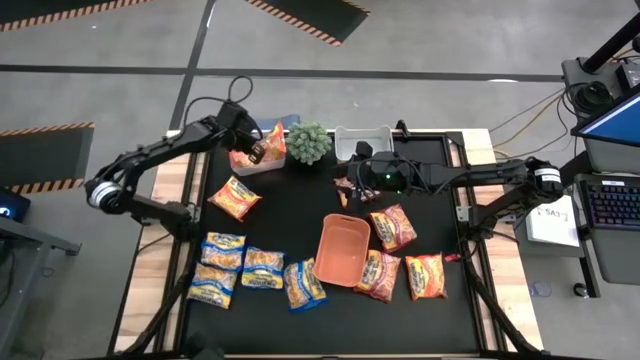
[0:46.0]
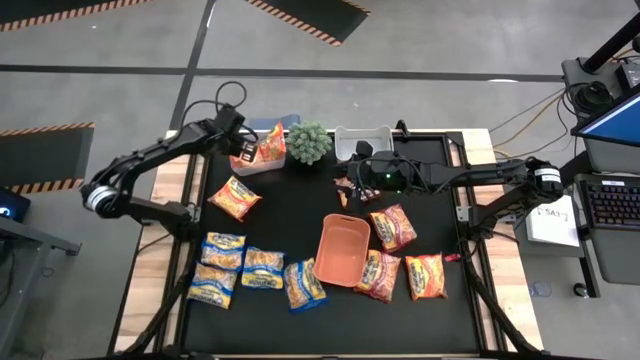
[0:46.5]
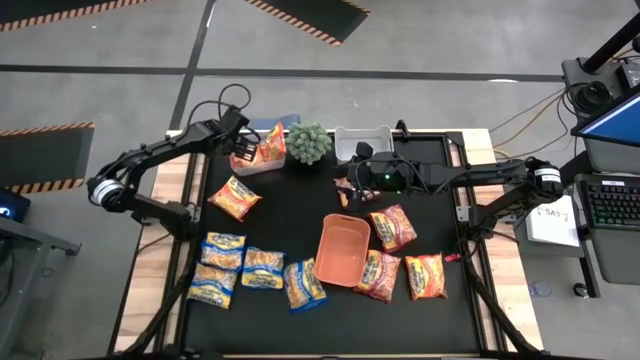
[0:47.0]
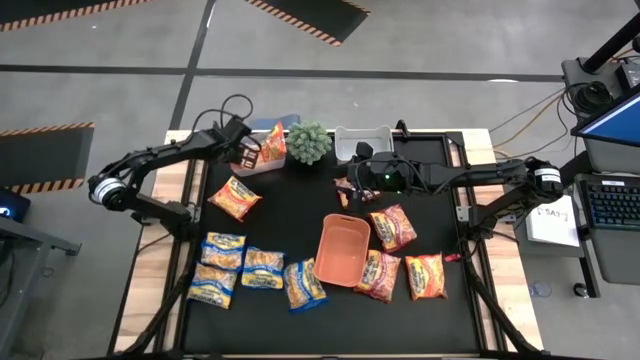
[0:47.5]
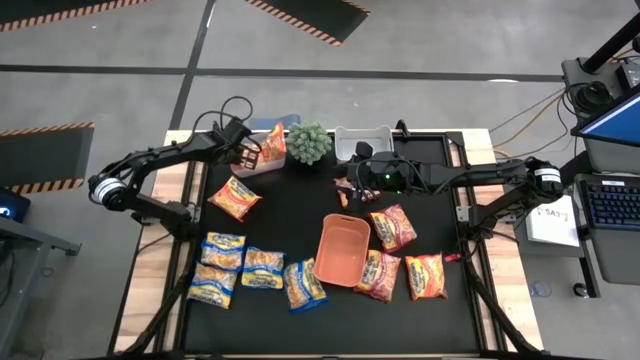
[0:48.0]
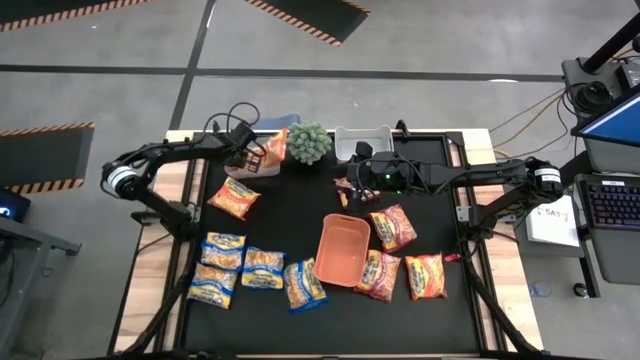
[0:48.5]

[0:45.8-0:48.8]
Task: Sort Maruchan noodles
Adjust the orange noodle pack in the transparent bin

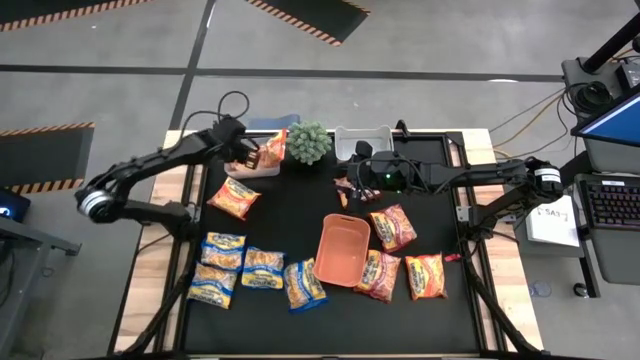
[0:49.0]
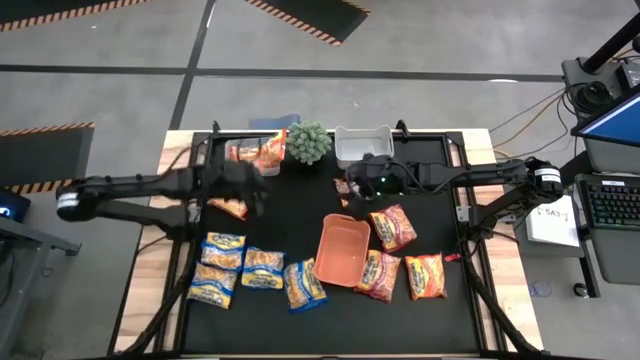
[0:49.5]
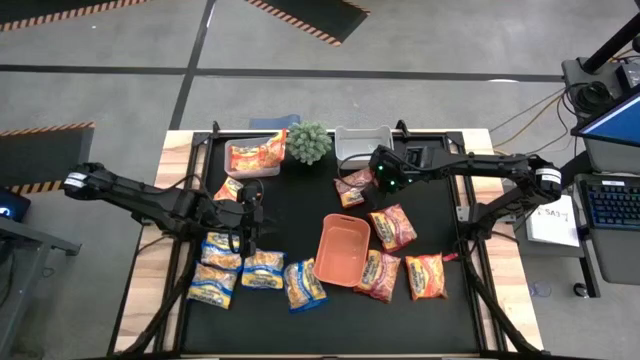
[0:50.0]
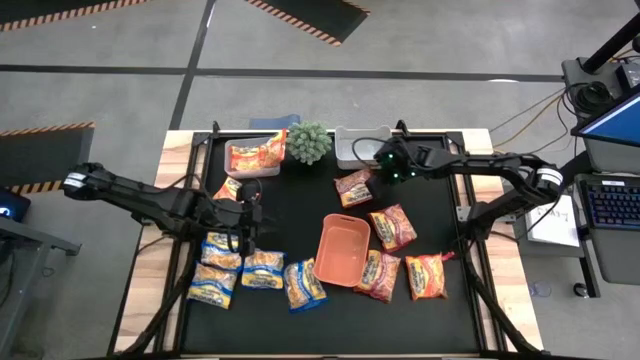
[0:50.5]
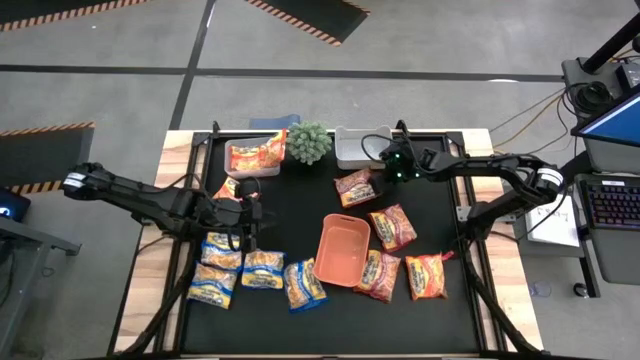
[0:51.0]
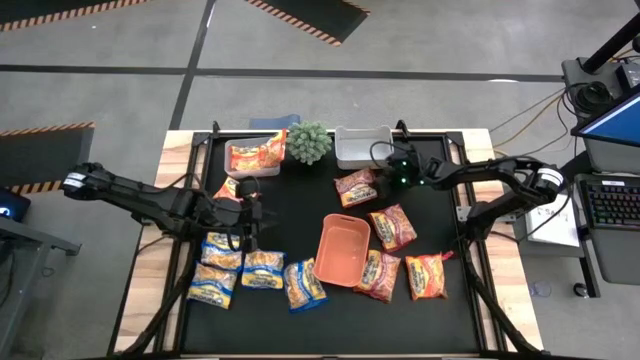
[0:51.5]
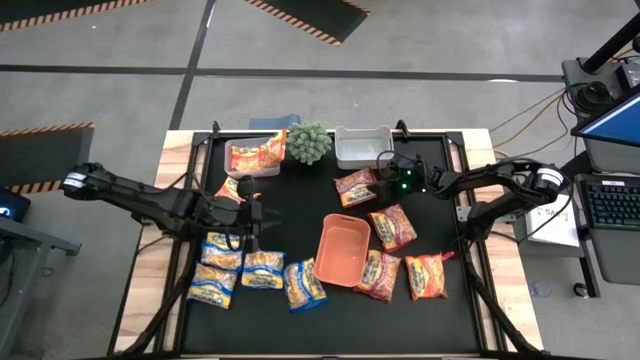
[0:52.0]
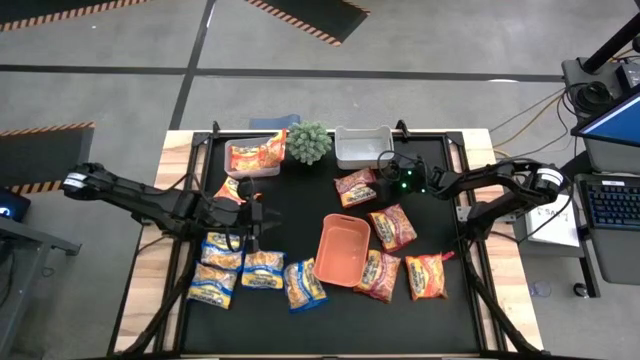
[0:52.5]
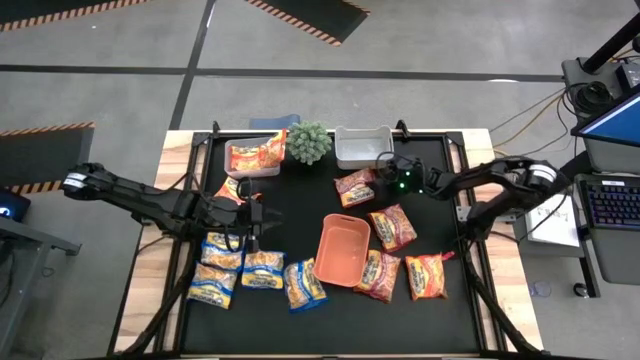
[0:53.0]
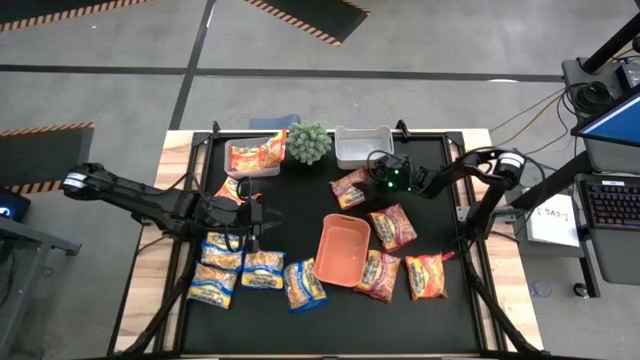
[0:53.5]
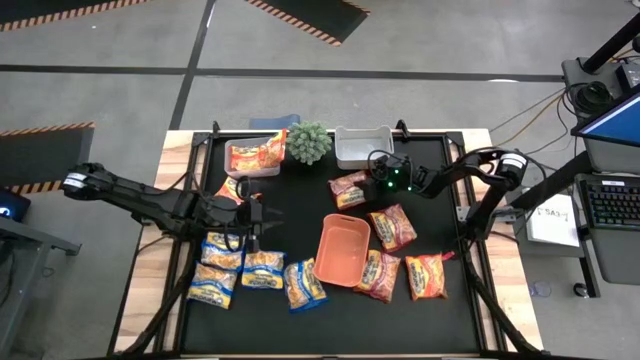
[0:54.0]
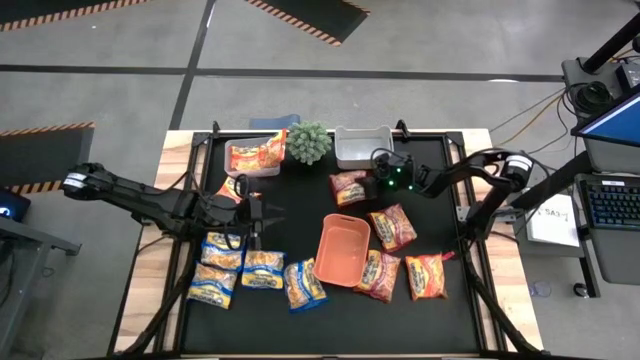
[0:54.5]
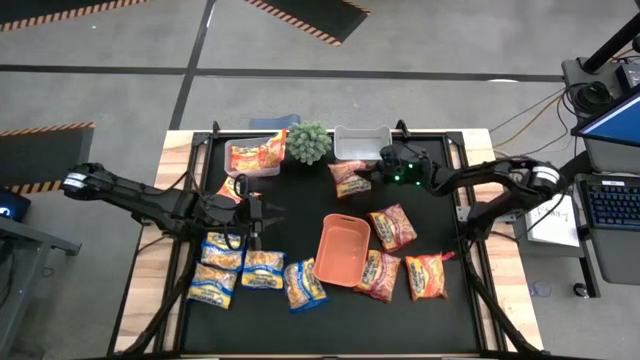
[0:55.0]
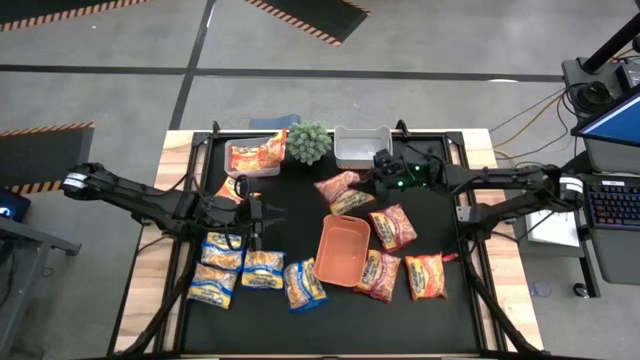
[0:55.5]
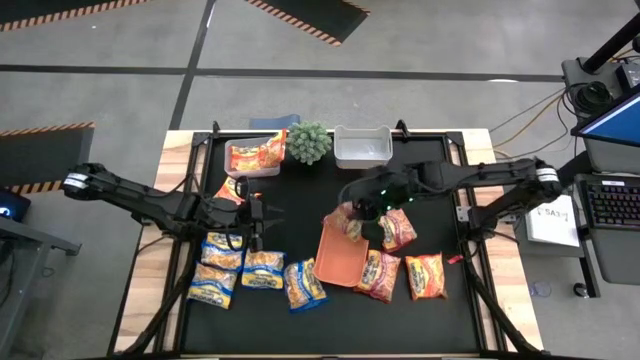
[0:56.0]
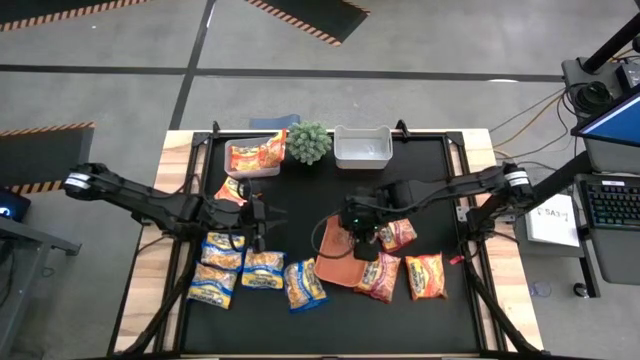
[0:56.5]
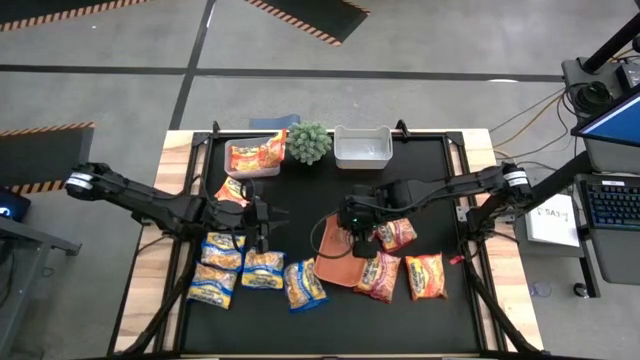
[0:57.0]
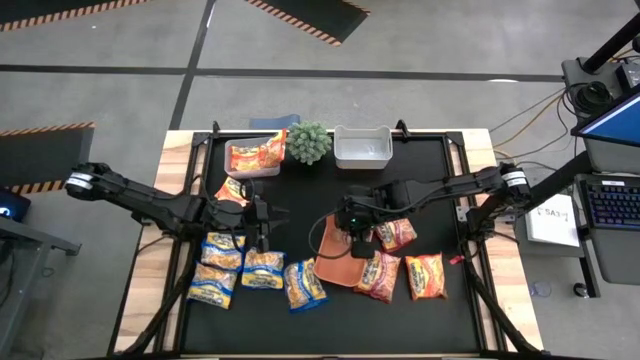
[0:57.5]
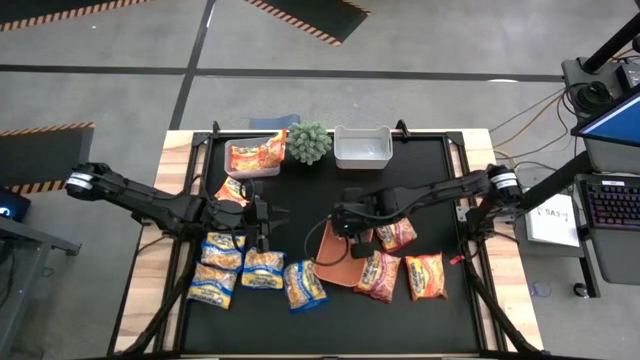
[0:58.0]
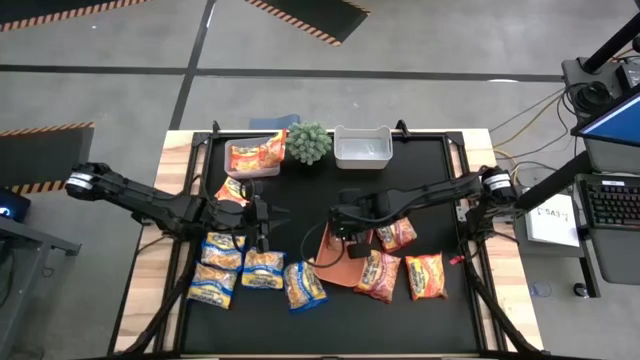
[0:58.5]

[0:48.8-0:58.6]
Put the red noodle pack into the orange bin

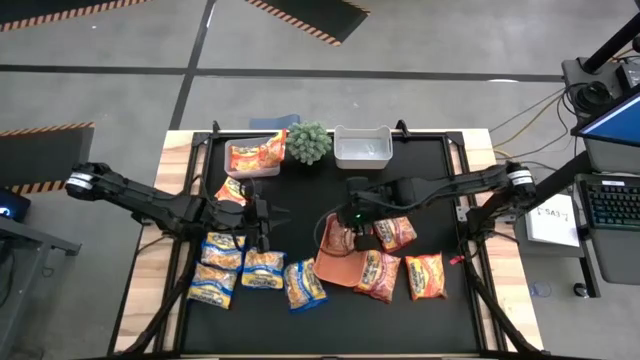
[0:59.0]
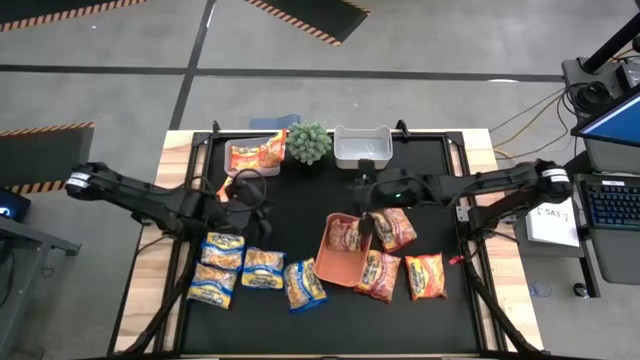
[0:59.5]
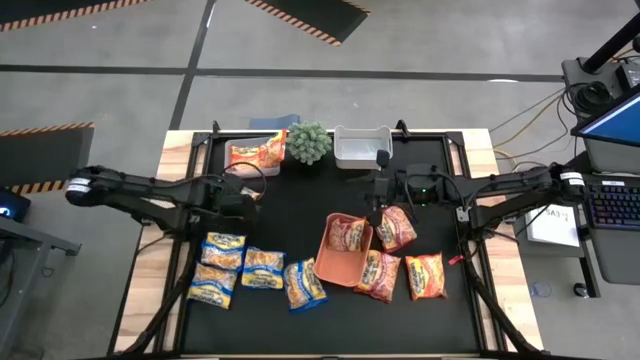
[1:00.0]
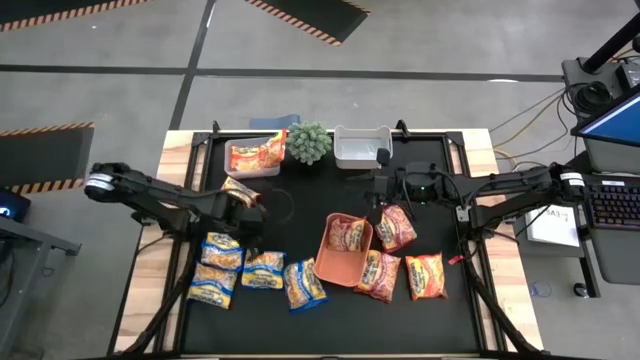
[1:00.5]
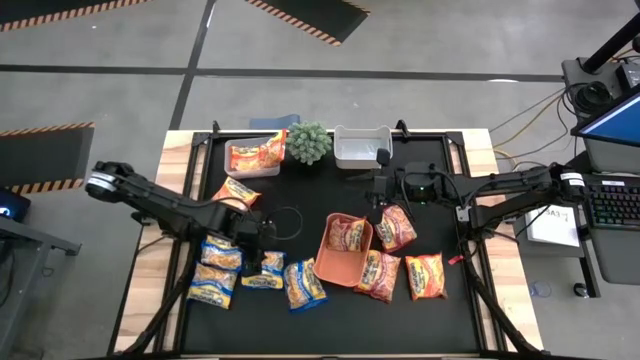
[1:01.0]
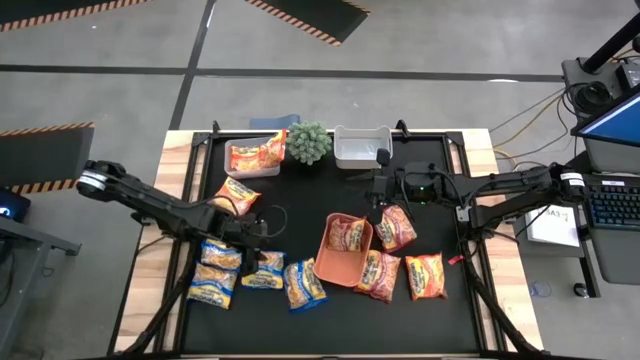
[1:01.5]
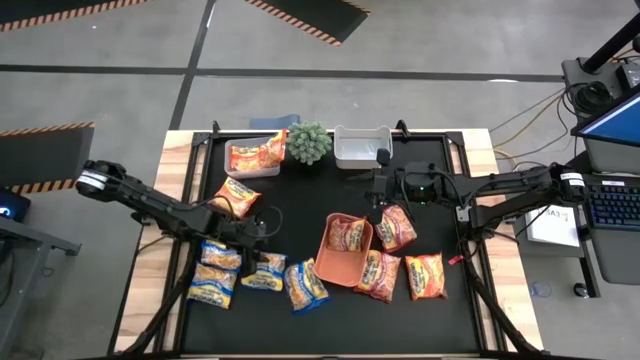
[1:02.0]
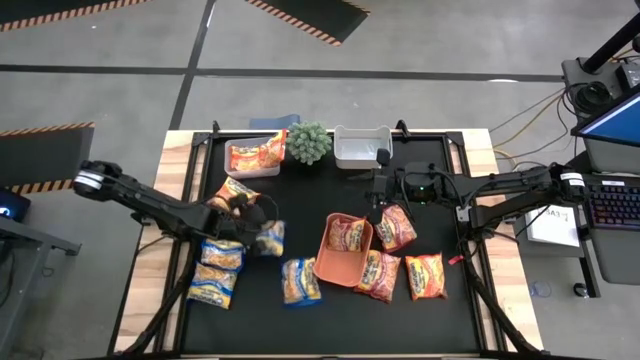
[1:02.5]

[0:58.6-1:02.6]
Put the blue noodle pack into the gray bin

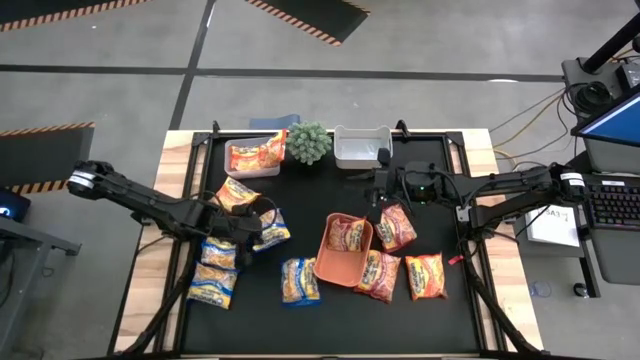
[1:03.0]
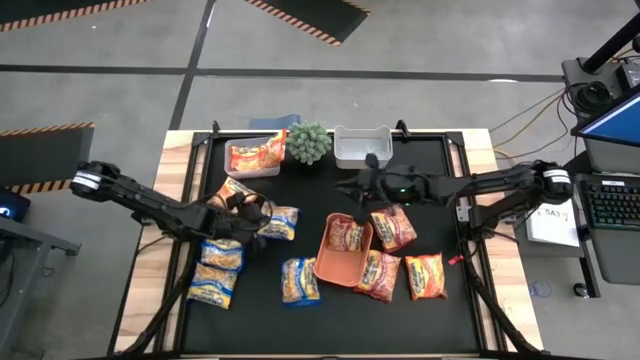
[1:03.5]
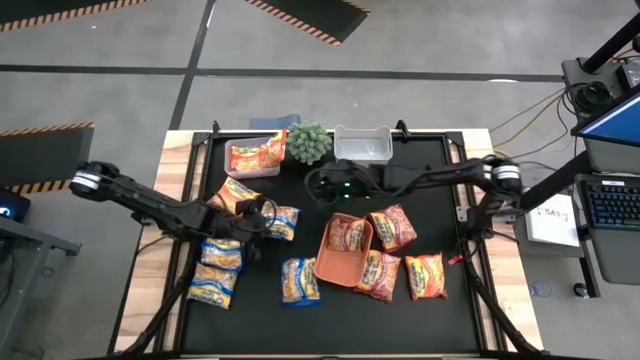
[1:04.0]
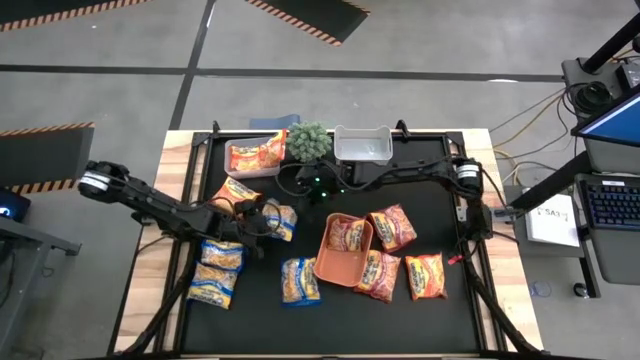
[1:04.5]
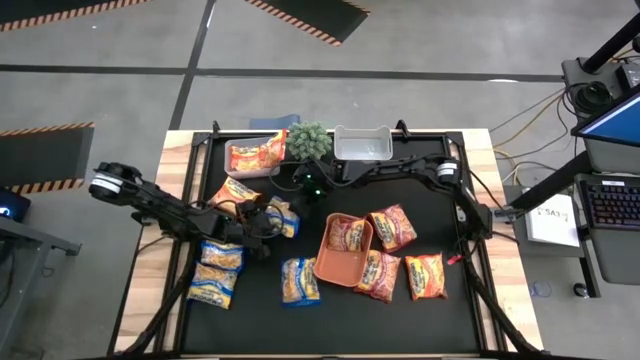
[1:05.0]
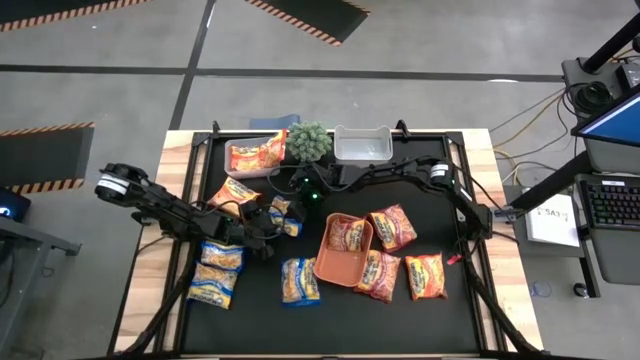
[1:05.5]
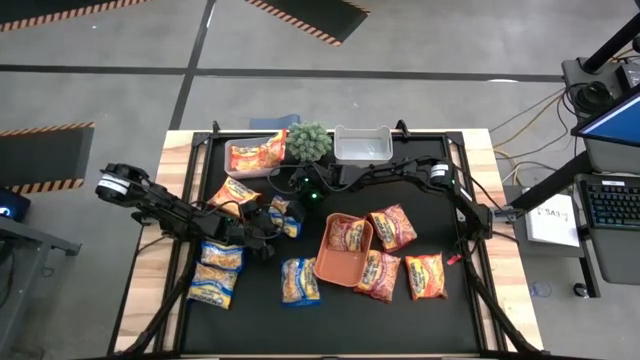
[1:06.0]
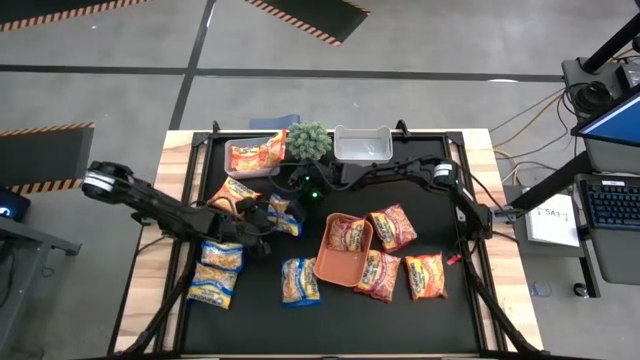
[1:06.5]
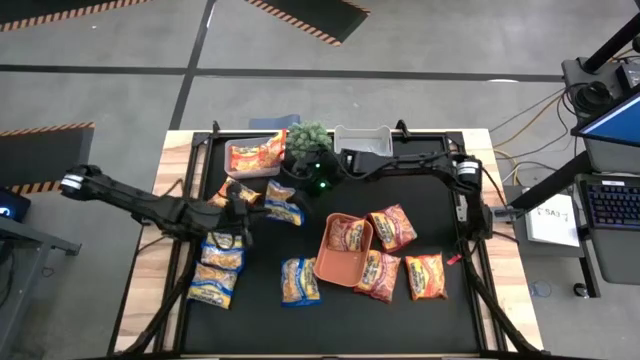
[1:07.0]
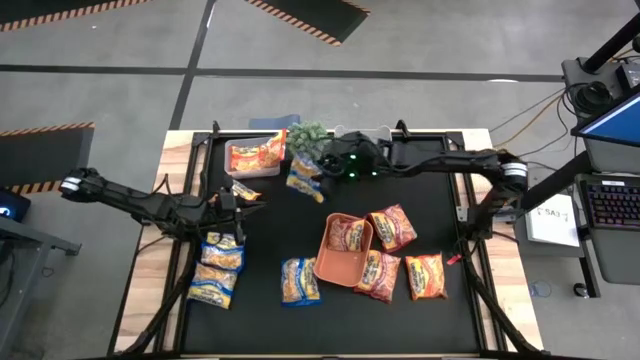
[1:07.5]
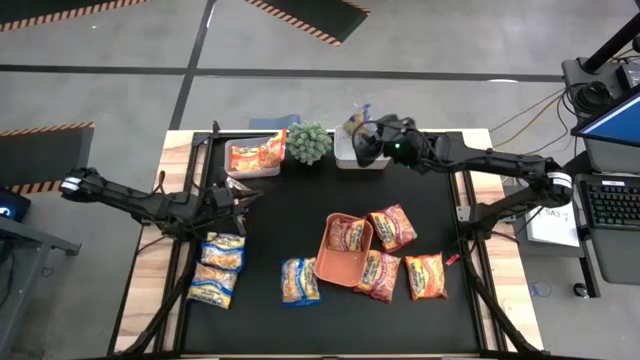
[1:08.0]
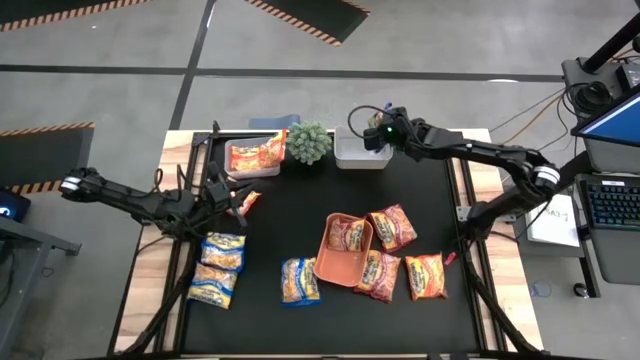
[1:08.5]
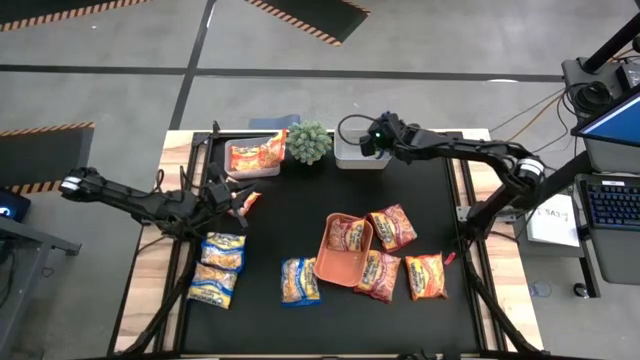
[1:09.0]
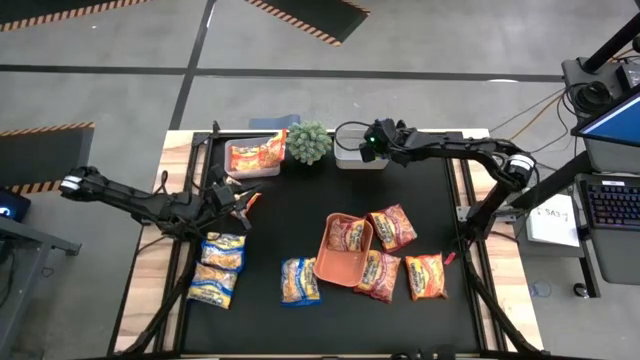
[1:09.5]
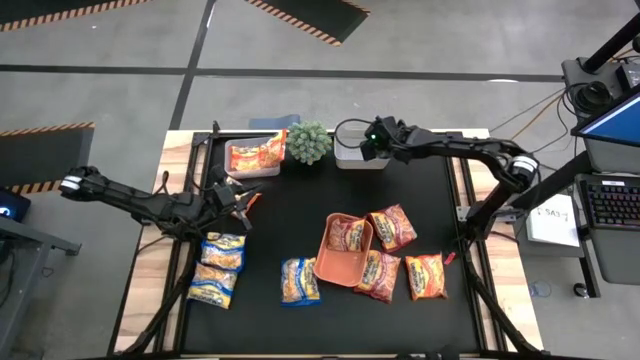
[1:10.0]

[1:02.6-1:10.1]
Put the blue noodle pack into the gray bin
